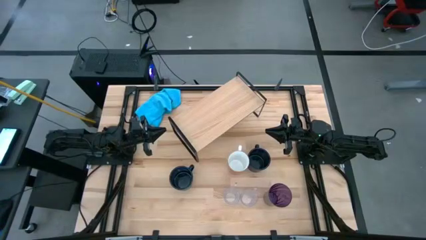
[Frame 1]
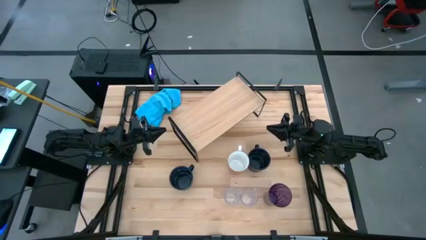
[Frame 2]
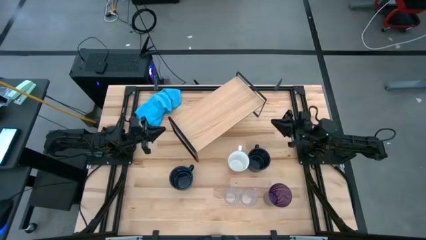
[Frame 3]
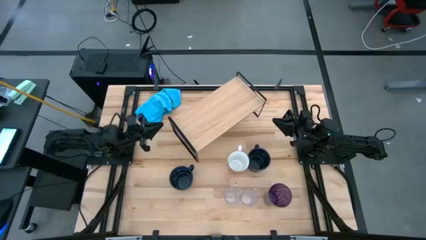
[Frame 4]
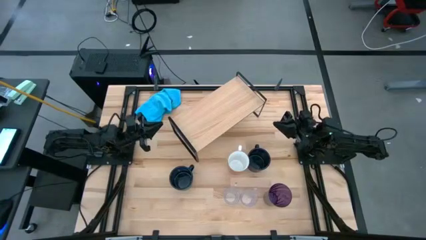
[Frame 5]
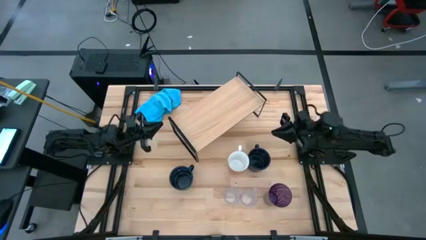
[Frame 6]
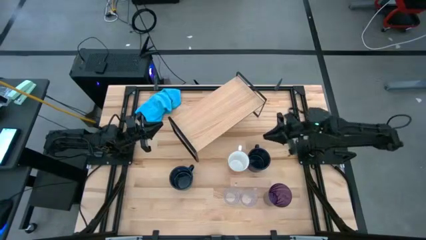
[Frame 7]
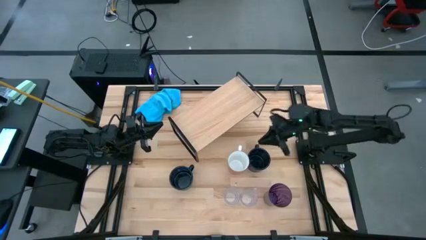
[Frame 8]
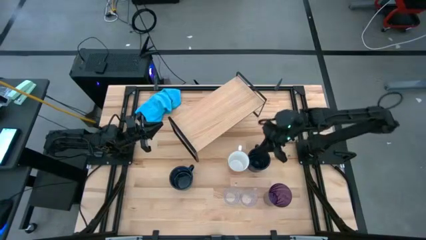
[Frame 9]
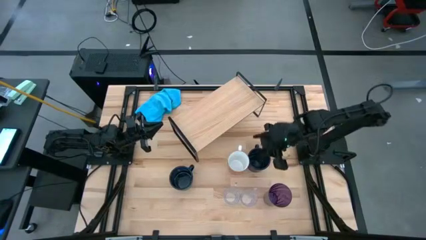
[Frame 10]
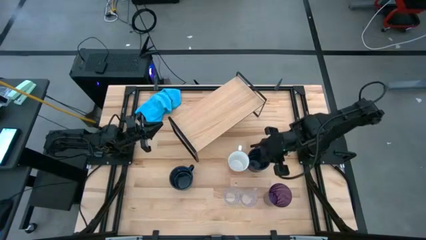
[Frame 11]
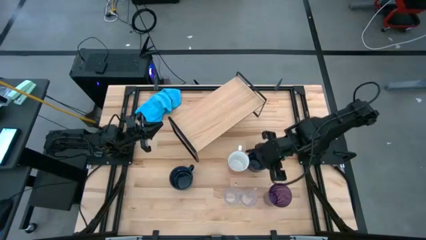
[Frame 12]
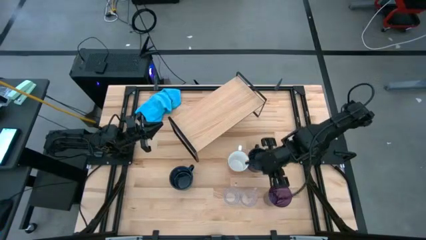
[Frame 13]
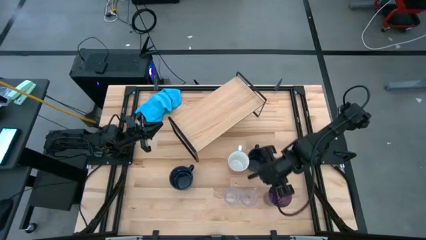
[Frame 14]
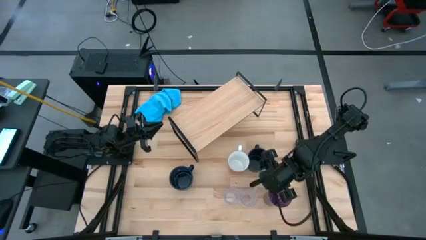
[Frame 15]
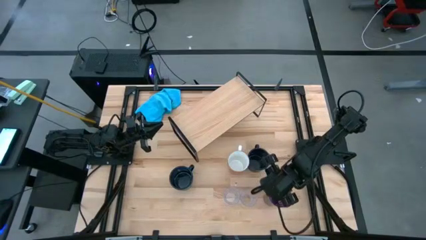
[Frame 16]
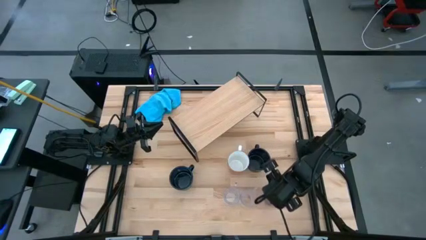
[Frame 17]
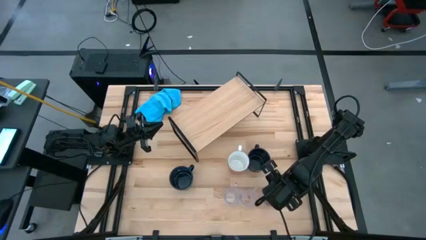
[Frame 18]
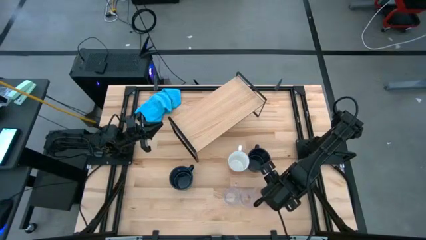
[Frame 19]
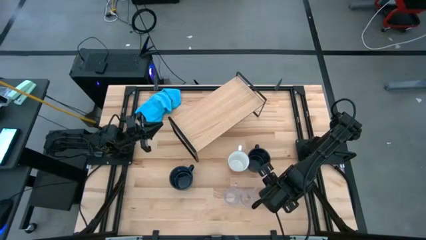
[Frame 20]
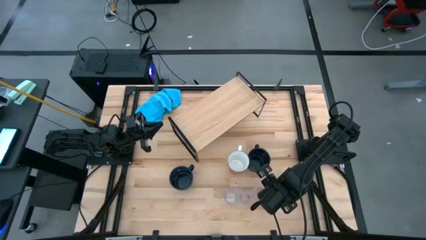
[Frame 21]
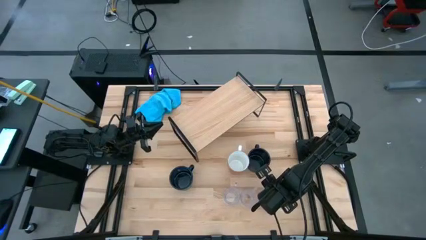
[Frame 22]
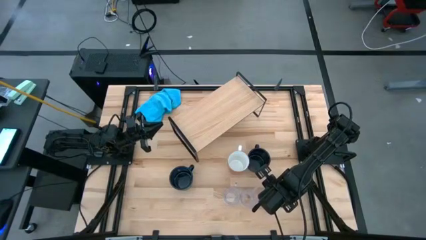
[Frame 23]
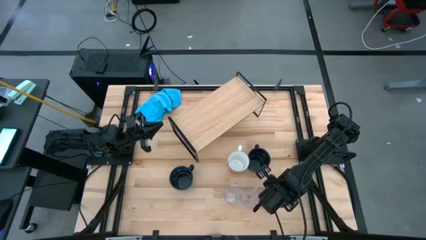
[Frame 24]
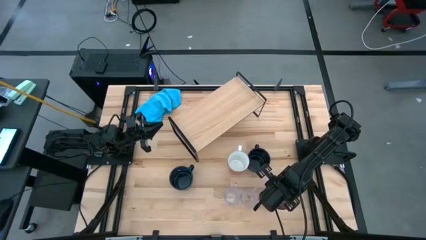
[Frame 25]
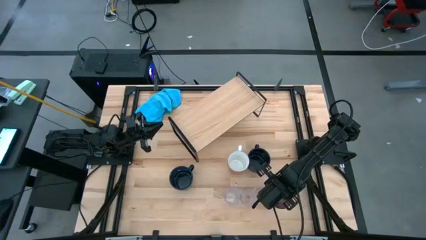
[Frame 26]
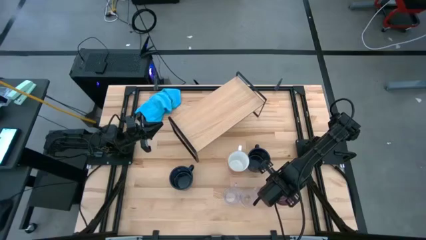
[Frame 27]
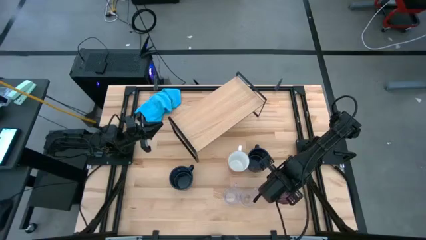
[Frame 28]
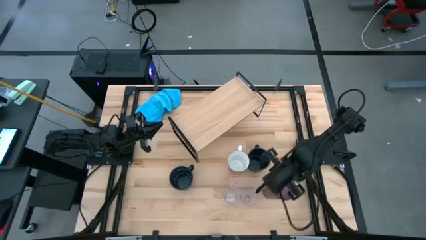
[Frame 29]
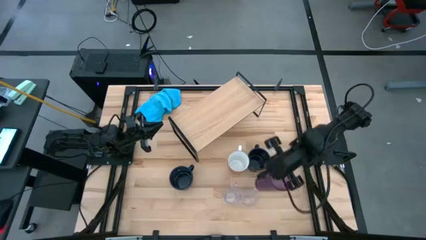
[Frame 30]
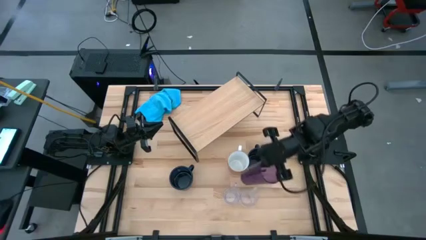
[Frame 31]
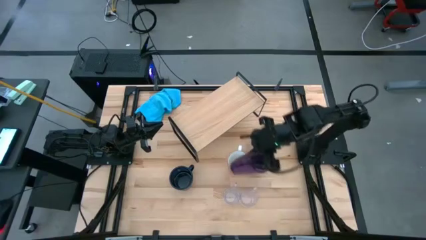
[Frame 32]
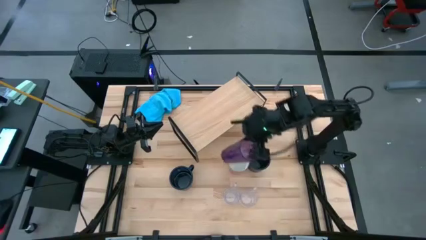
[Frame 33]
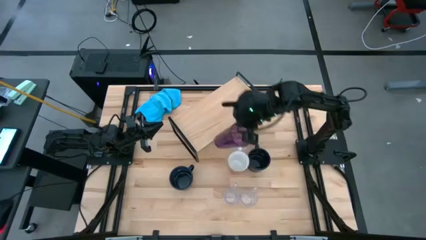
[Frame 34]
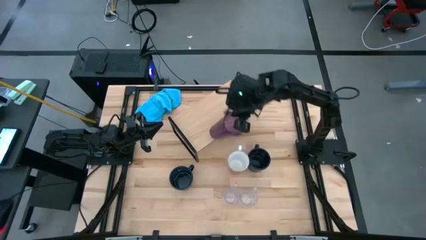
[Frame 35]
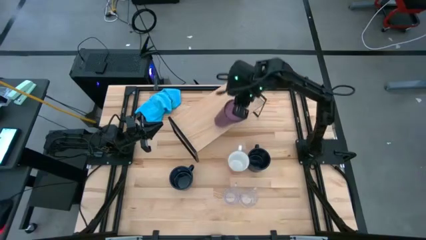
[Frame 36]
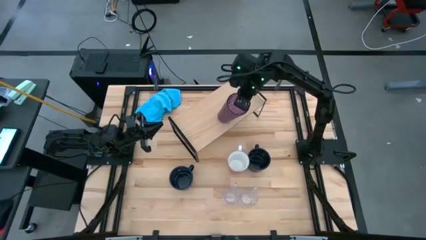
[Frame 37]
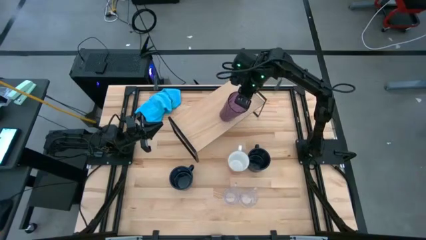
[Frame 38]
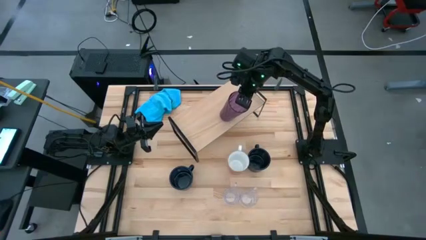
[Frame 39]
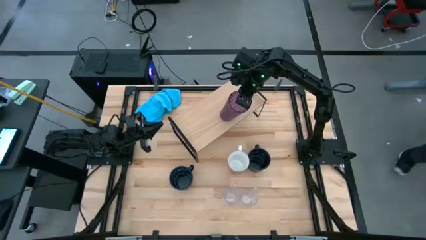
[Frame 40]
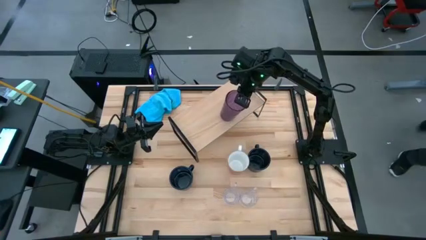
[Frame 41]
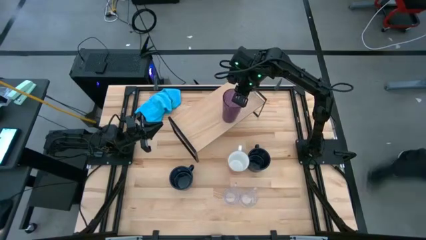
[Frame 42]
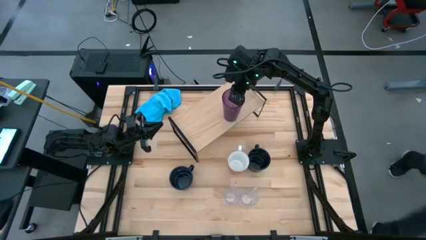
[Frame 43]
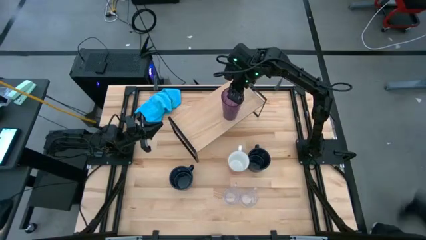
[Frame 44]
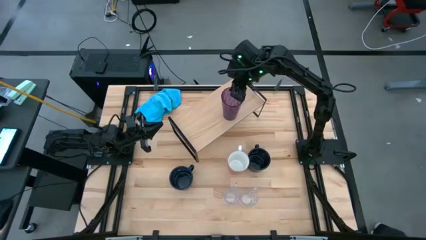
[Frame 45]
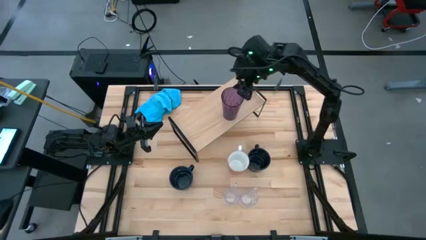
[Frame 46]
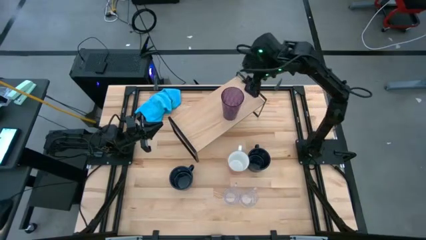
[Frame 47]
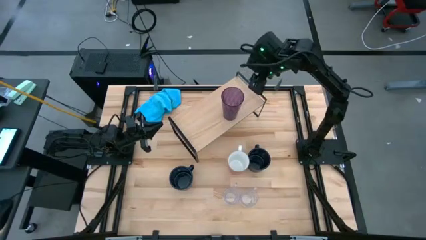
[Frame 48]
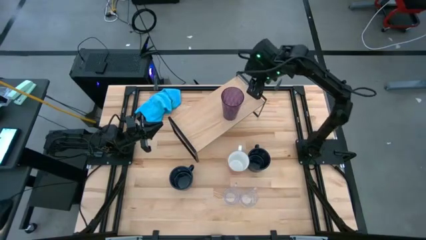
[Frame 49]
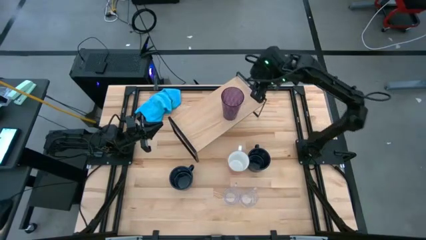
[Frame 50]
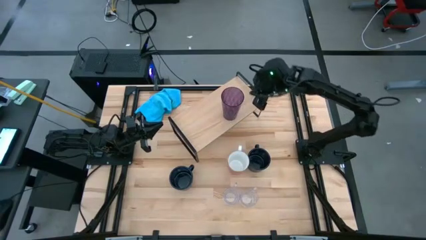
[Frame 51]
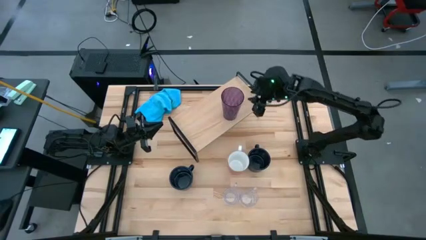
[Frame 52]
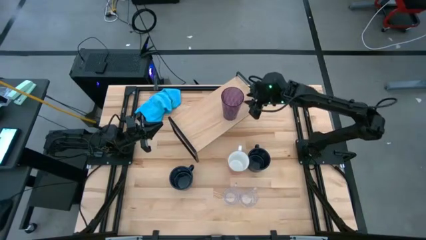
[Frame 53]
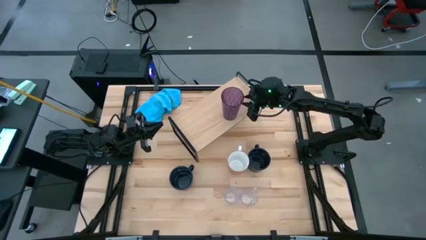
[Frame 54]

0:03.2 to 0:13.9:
Task: Stack small to large cups/mugs on shelf
Put the purple cup on the shelf
